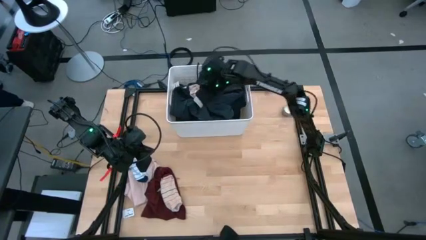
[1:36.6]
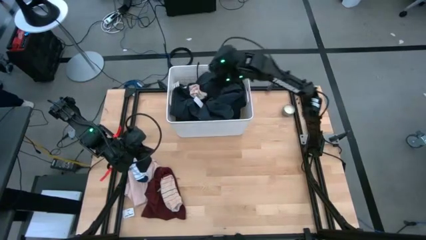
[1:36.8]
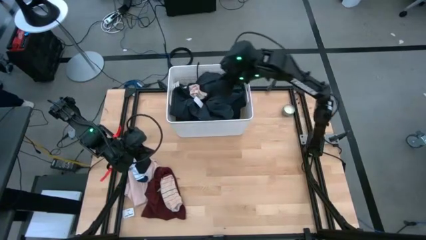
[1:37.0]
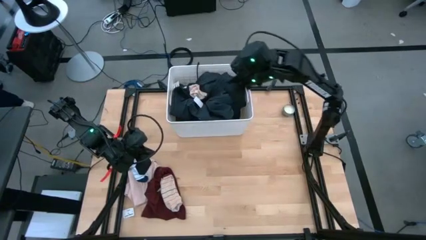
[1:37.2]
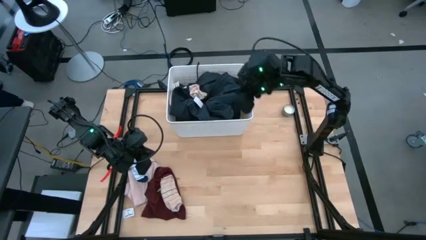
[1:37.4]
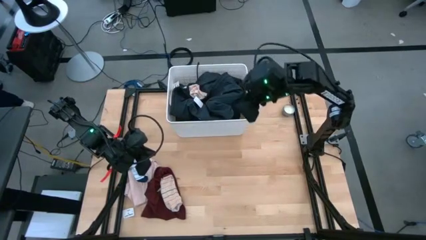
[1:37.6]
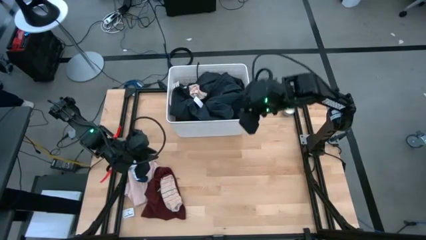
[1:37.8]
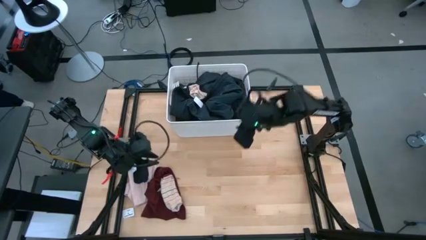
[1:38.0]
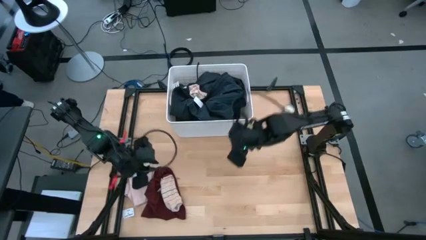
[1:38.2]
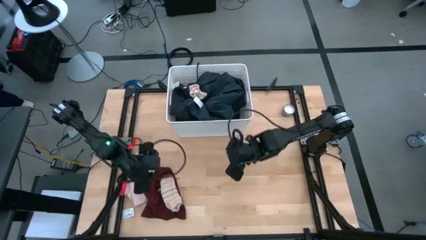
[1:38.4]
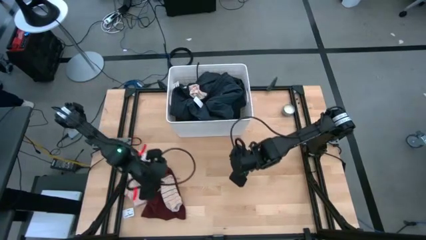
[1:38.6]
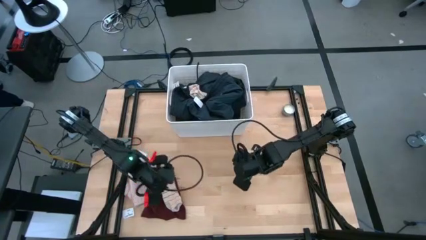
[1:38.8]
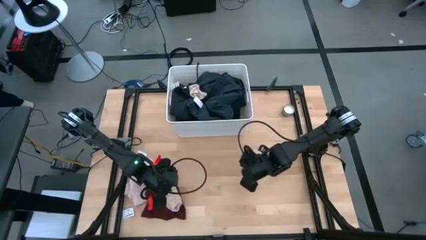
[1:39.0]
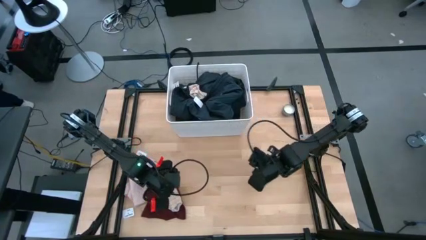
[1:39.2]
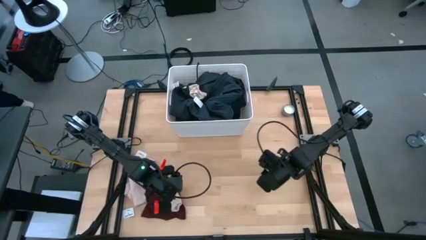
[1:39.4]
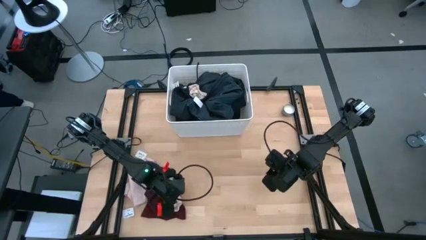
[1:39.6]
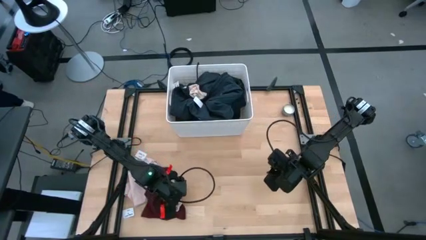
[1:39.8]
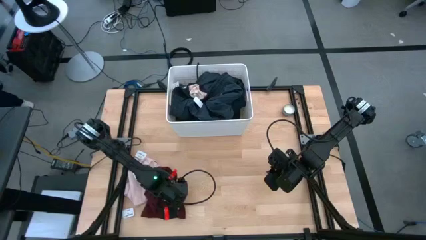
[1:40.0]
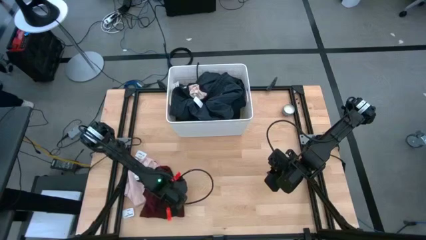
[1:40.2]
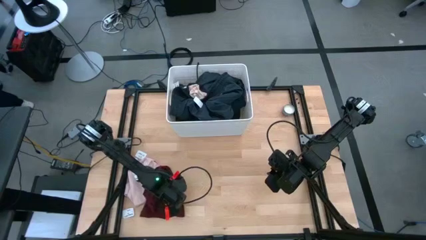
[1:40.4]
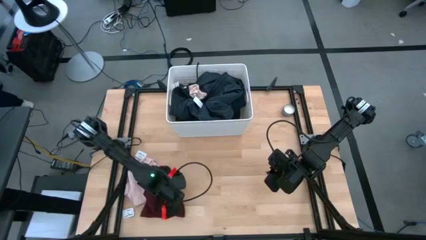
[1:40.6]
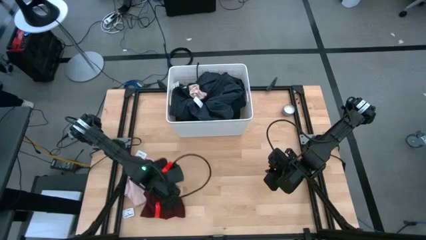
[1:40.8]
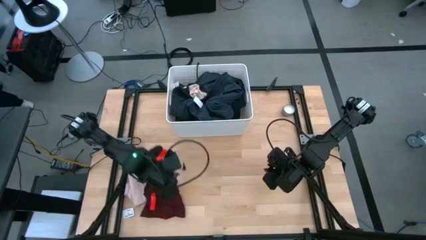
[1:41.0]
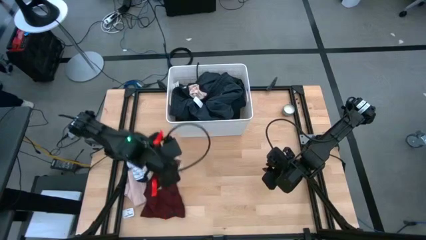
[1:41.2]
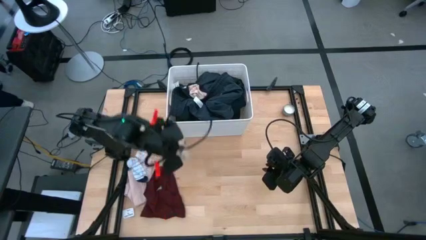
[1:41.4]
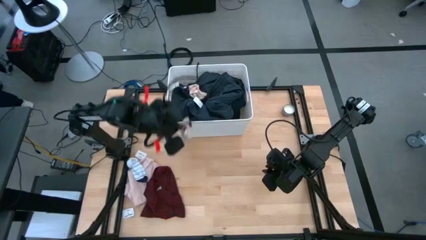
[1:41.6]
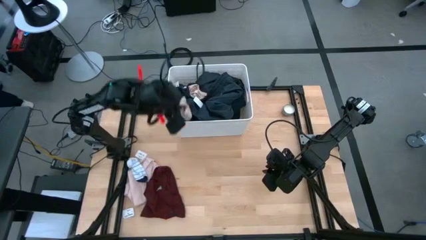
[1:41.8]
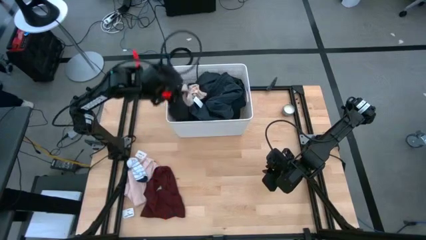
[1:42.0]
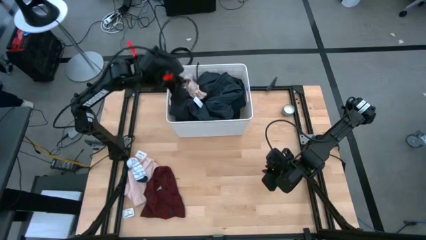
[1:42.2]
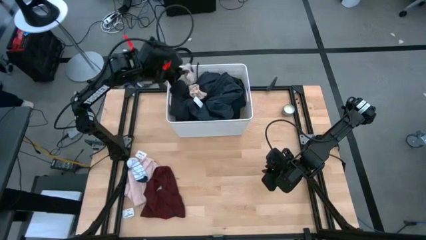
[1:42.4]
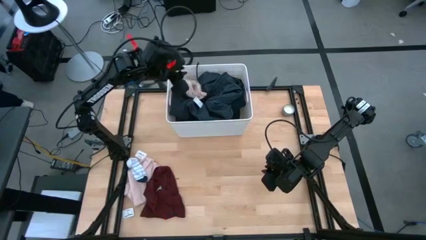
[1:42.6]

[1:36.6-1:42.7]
Task: Sort clothes
Put the brown sock into the white laundry bin

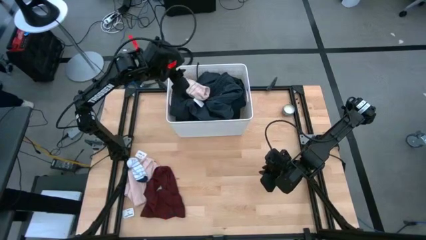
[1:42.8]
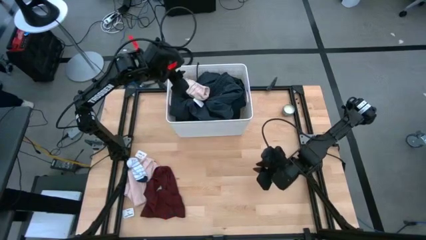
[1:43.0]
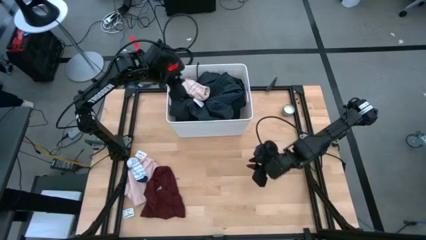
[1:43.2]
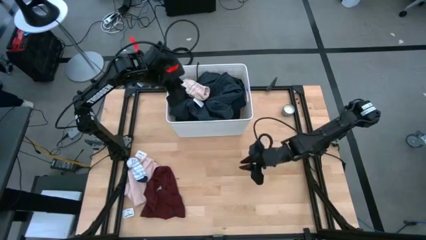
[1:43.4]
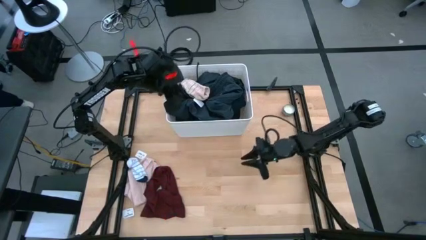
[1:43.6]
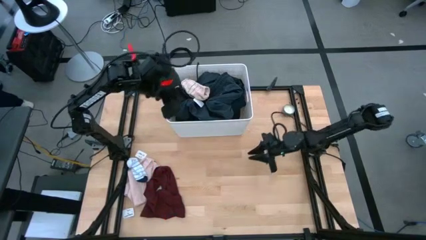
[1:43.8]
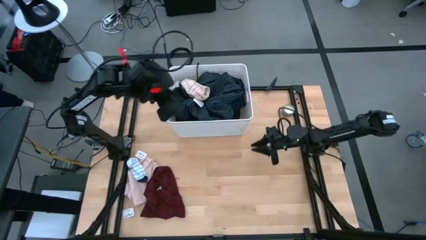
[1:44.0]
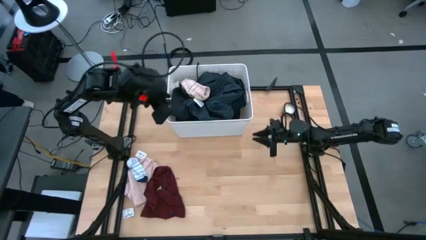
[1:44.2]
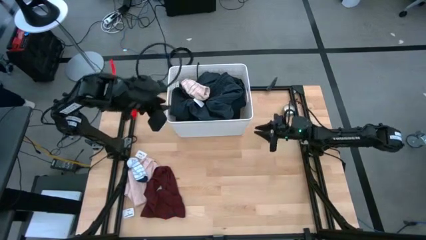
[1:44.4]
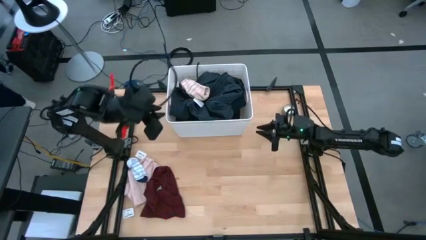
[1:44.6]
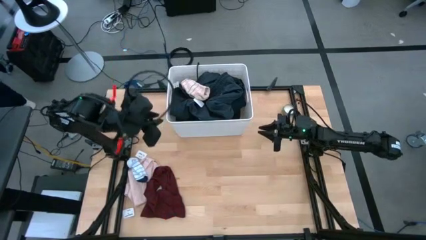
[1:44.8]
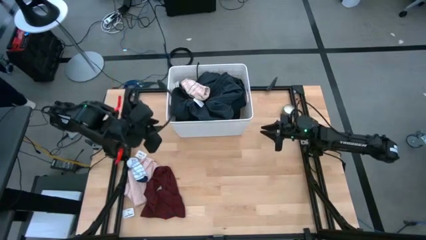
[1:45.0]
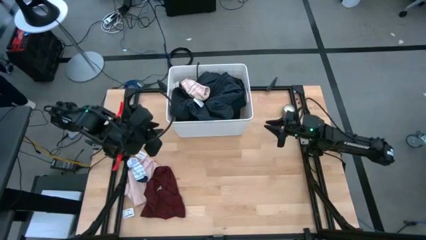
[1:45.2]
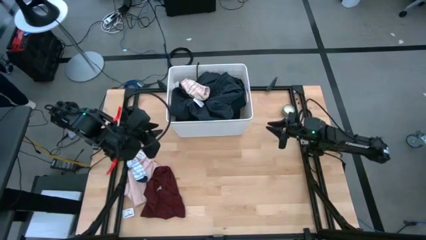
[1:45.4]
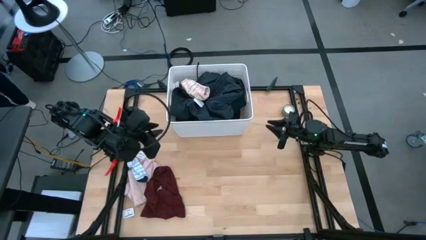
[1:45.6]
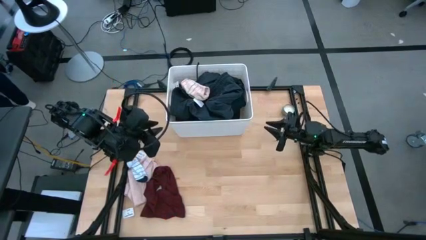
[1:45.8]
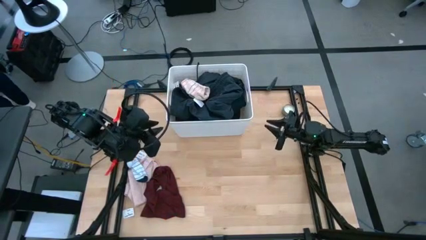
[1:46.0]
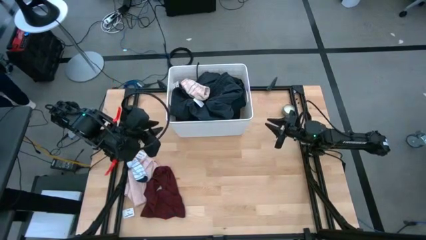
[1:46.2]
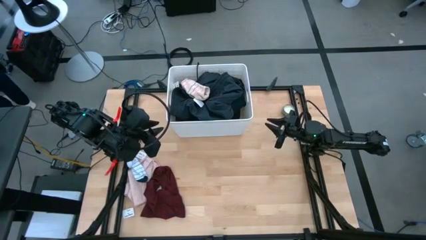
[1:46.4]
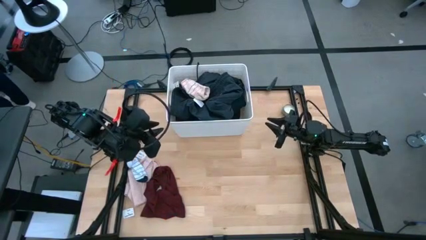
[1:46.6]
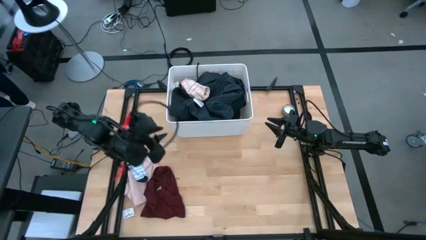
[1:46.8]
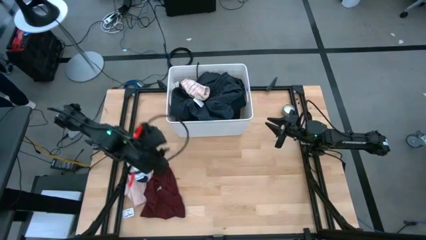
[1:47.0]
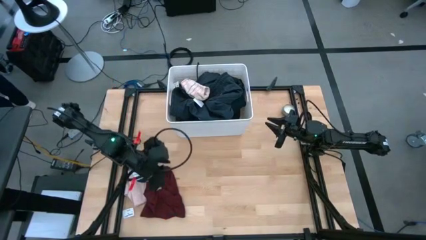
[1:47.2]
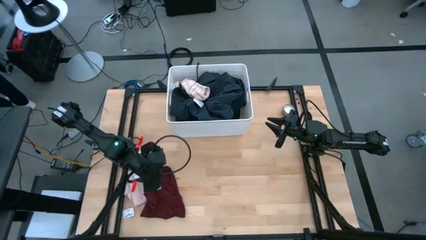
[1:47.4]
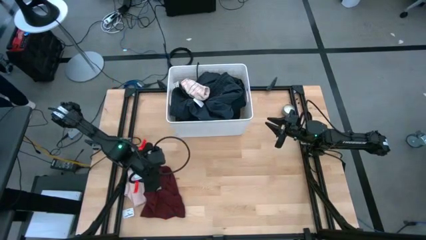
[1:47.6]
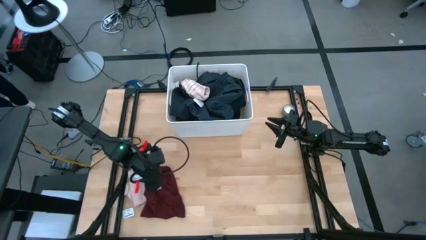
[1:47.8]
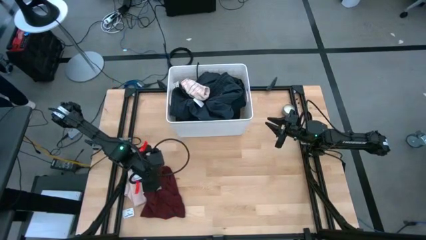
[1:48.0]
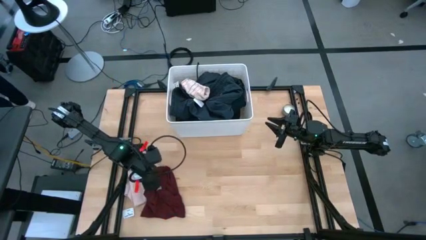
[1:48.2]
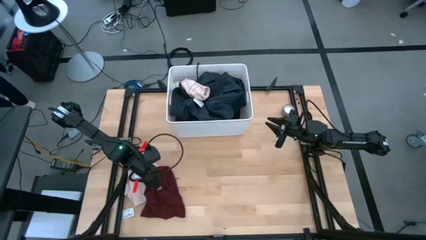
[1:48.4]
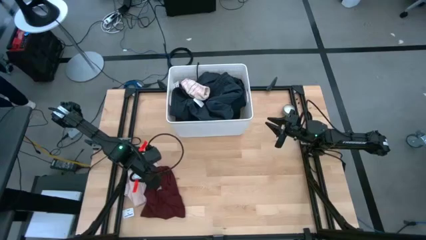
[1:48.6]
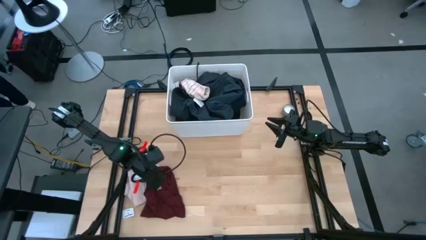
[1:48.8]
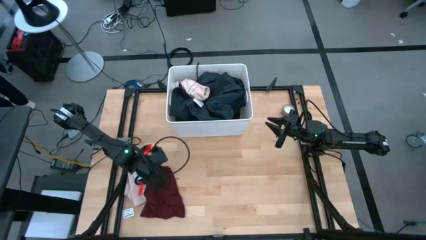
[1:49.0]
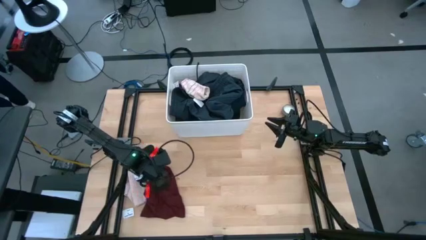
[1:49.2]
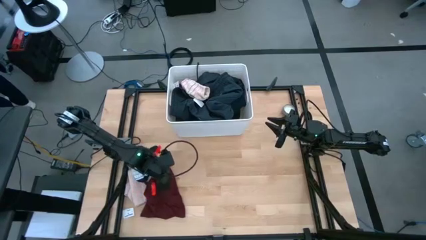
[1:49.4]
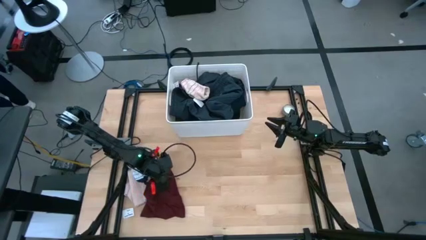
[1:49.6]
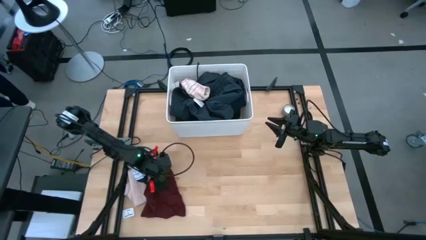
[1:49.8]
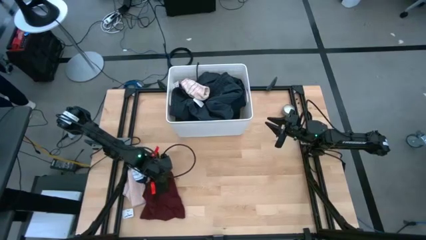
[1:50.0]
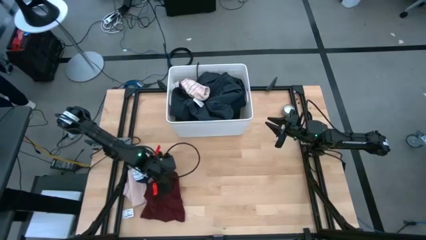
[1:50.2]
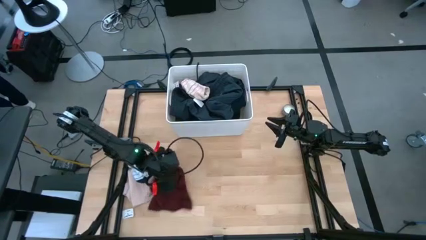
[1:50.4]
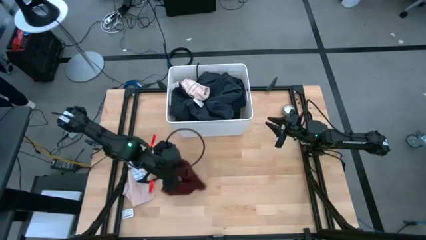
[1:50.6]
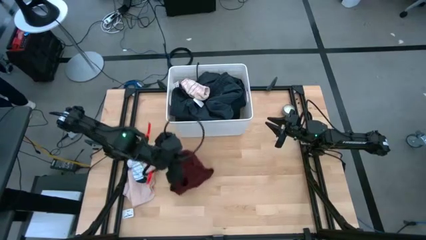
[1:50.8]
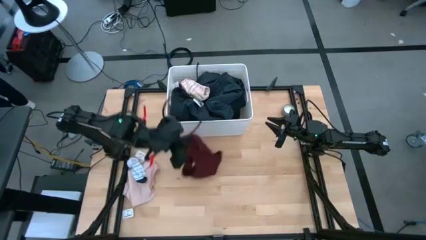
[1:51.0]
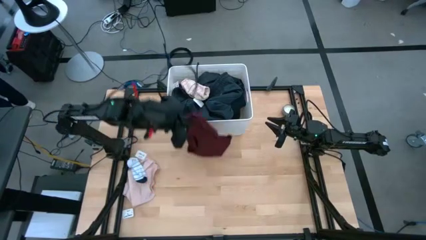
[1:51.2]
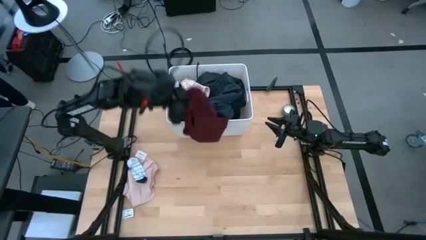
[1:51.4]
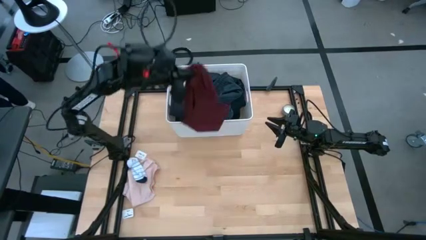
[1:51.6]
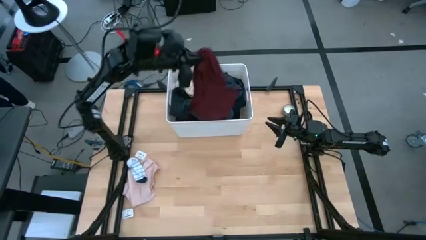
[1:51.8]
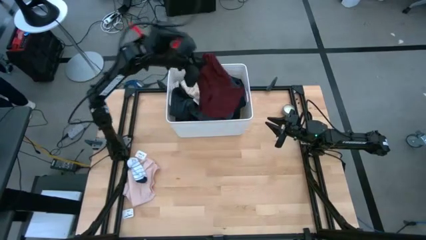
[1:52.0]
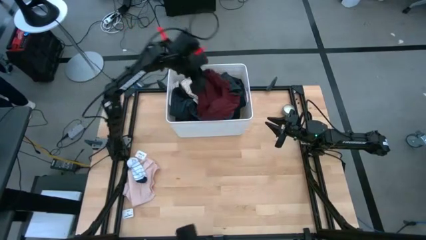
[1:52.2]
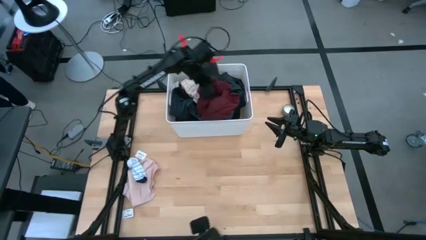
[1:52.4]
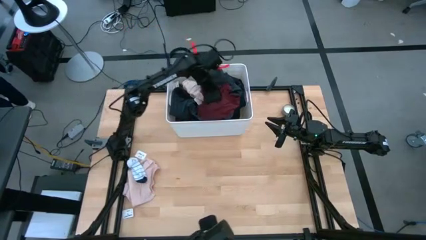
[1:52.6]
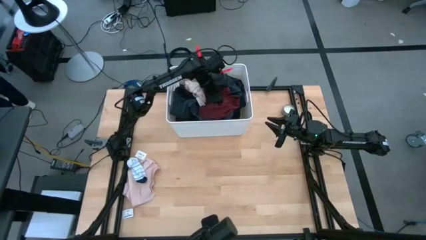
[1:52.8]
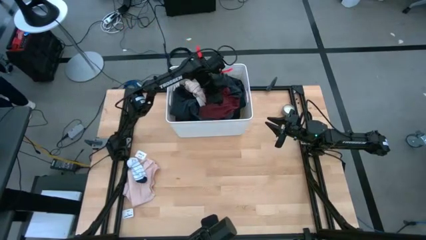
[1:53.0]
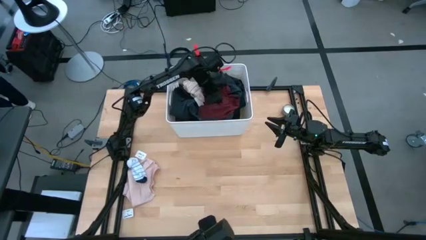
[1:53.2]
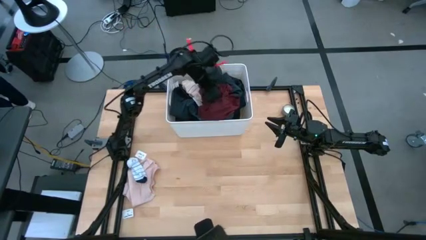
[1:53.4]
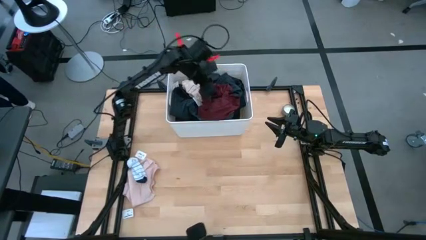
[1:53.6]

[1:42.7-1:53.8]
Put the red underwear into the white laundry bin
